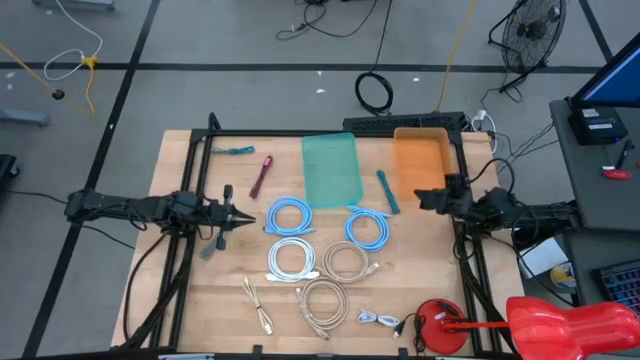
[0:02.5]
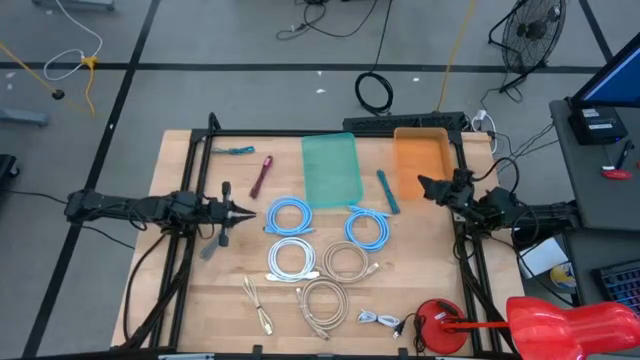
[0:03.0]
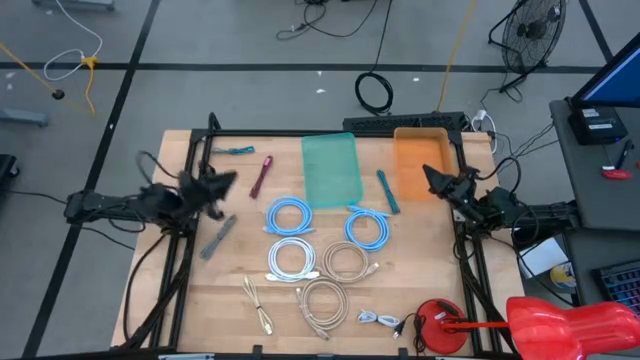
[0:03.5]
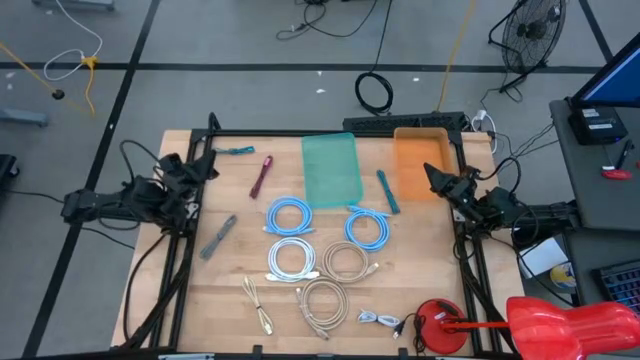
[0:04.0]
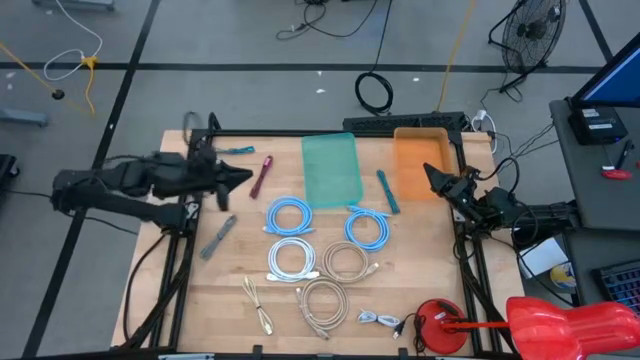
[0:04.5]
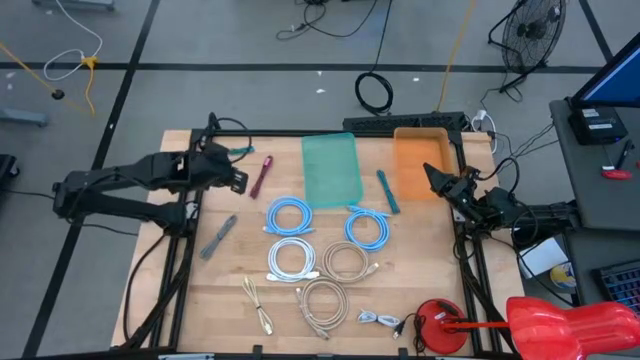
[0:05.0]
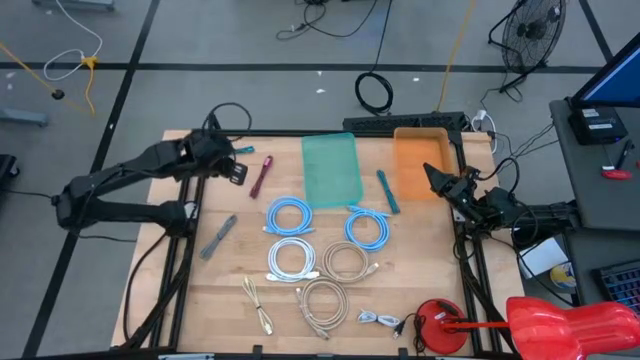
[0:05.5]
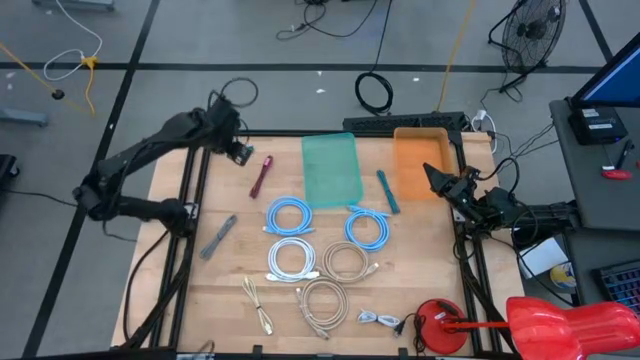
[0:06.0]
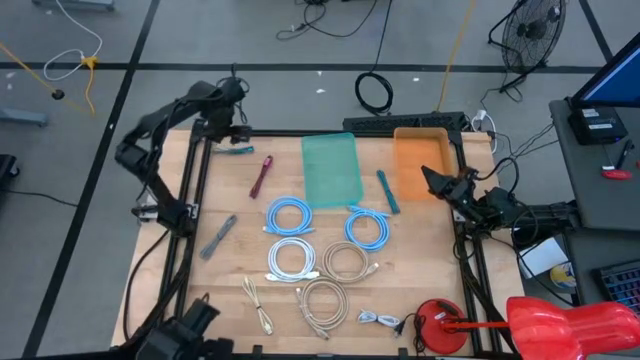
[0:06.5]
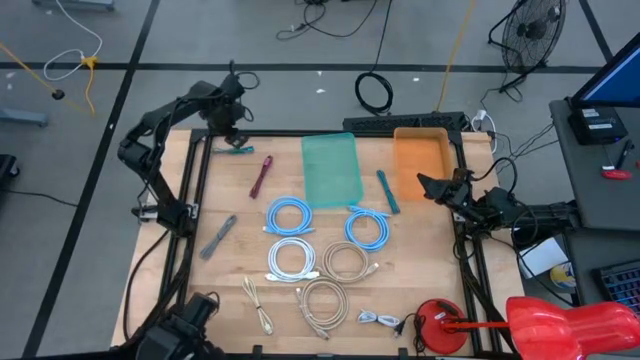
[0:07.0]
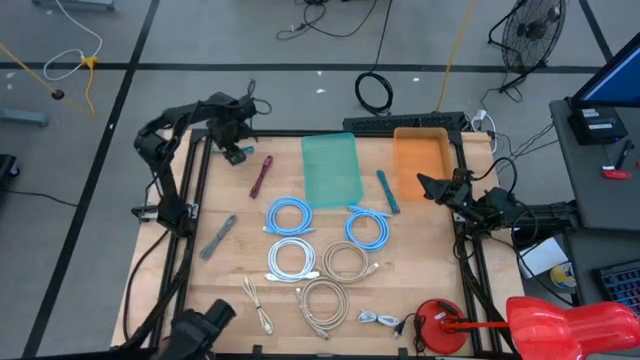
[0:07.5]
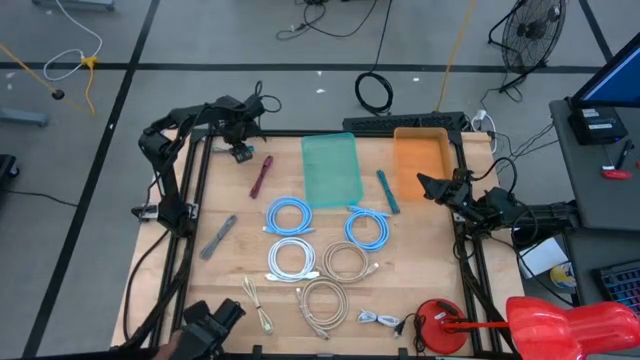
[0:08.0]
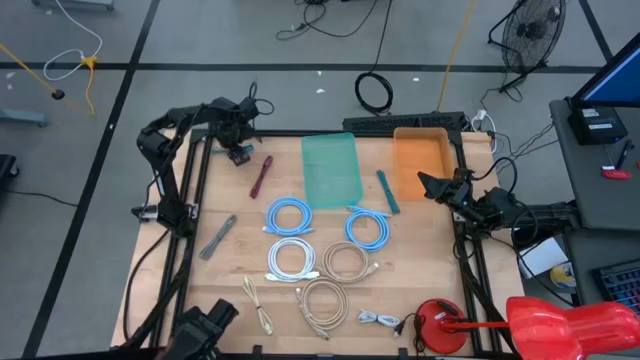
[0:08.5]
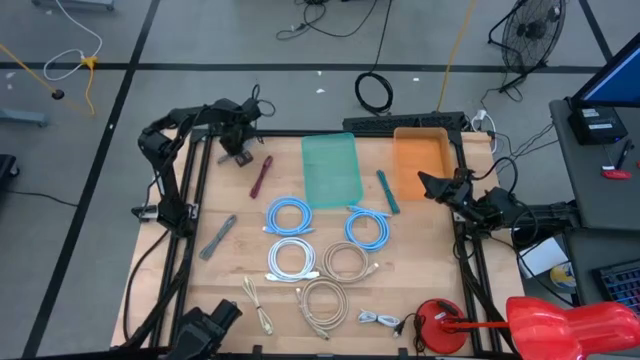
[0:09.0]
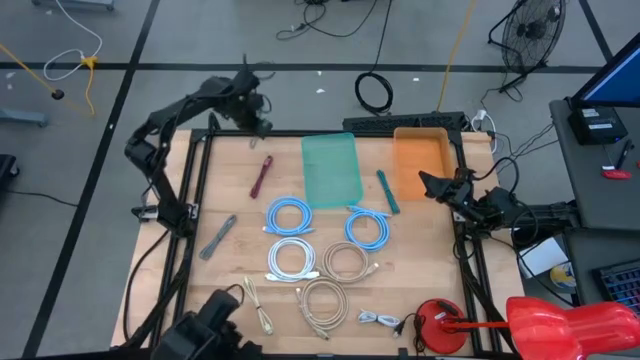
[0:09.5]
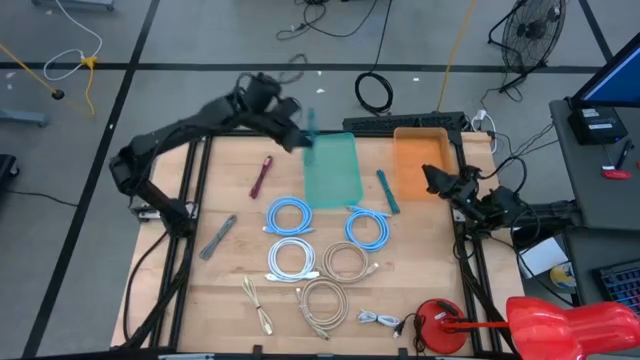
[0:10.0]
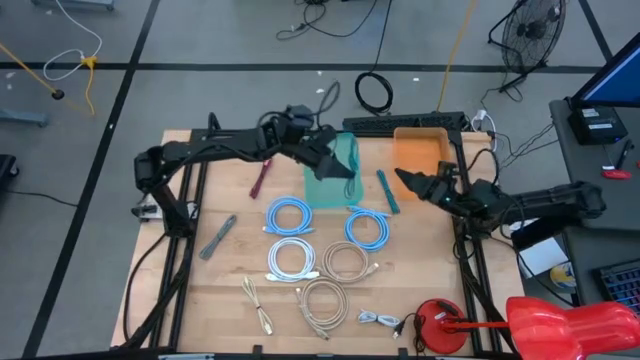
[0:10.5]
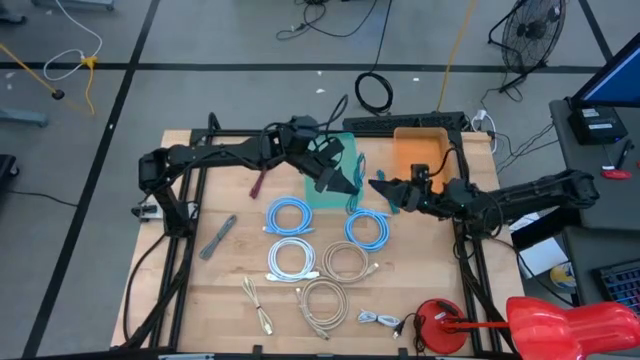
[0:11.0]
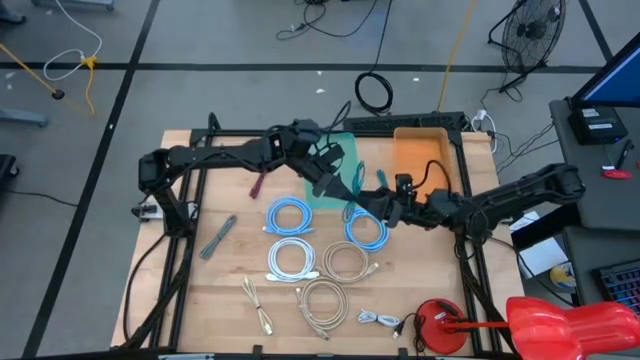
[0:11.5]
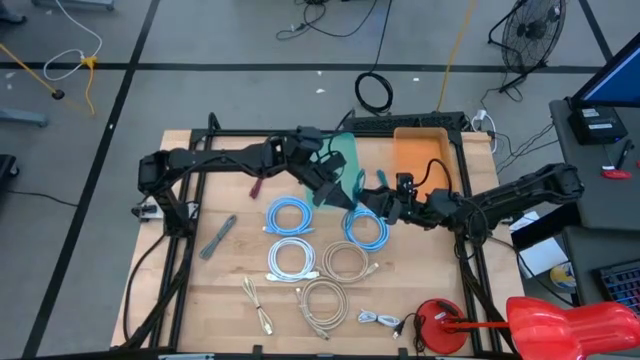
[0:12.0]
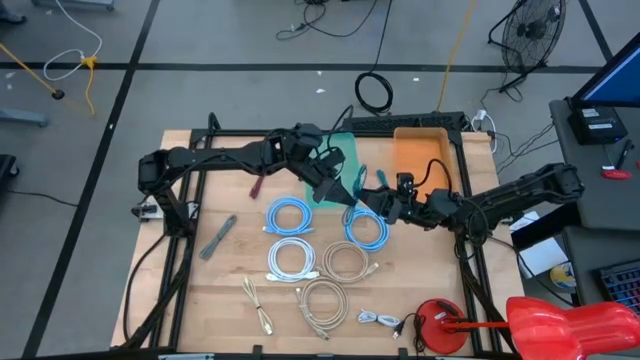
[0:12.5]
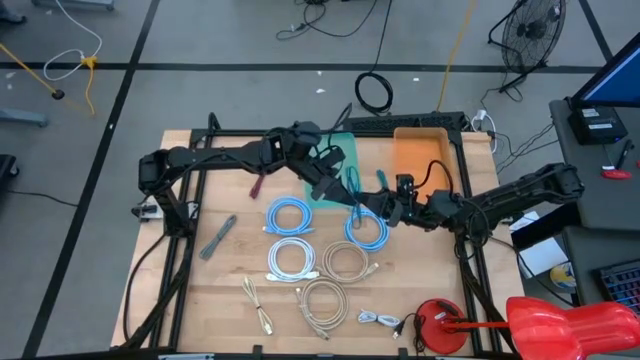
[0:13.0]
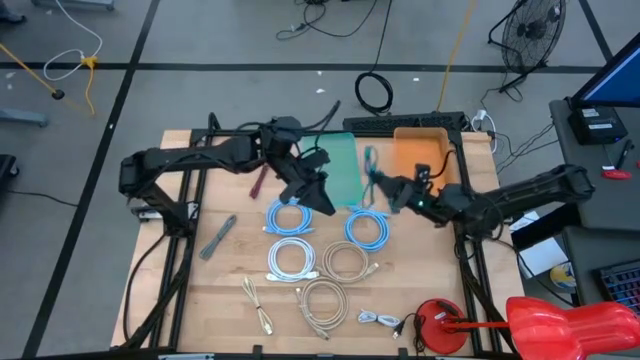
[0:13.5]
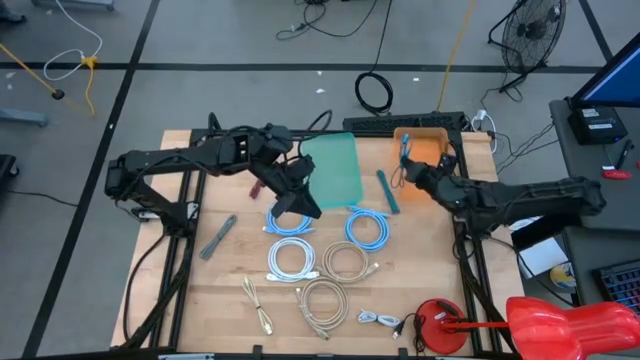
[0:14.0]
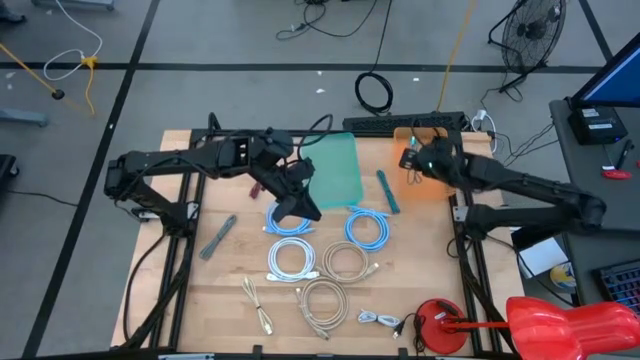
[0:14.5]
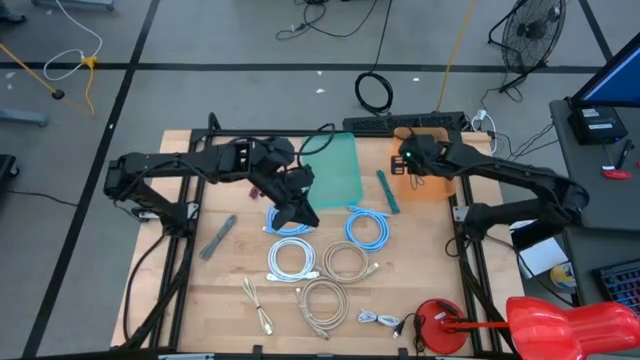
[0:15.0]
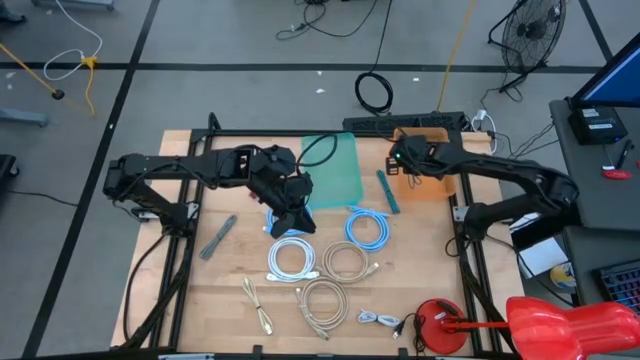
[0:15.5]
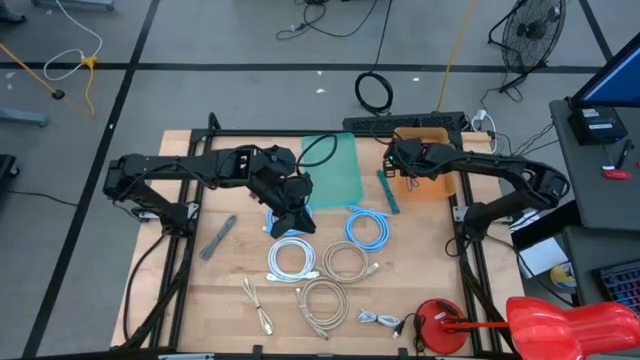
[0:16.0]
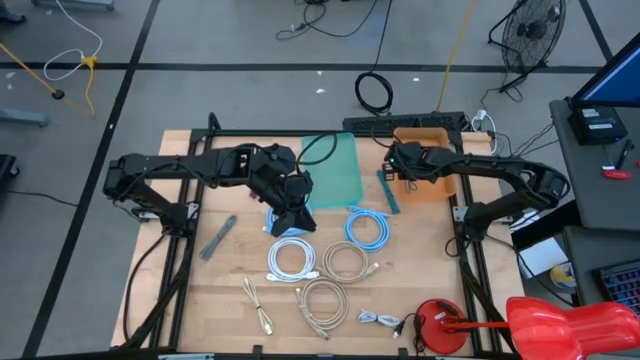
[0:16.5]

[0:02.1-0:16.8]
Task: Pick & Place USB Port
Put the top blue charger cable into the orange bin

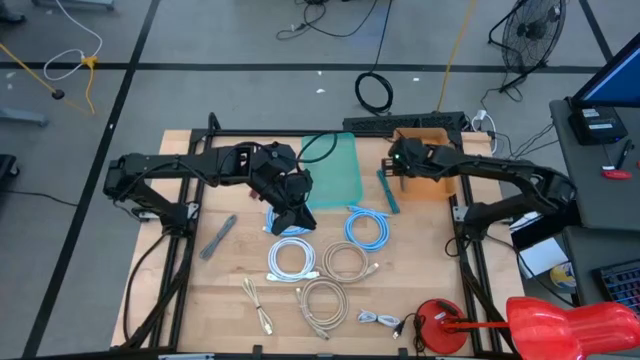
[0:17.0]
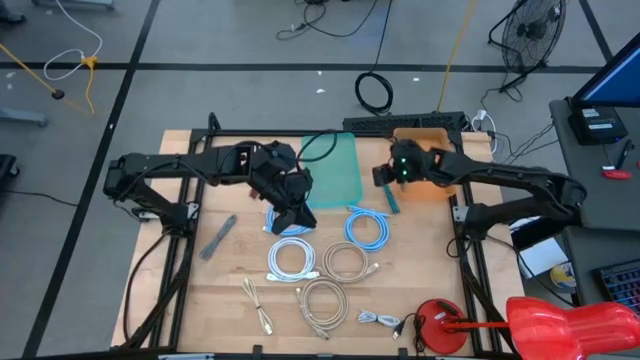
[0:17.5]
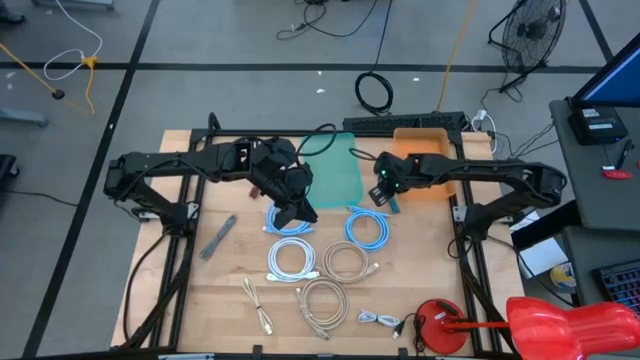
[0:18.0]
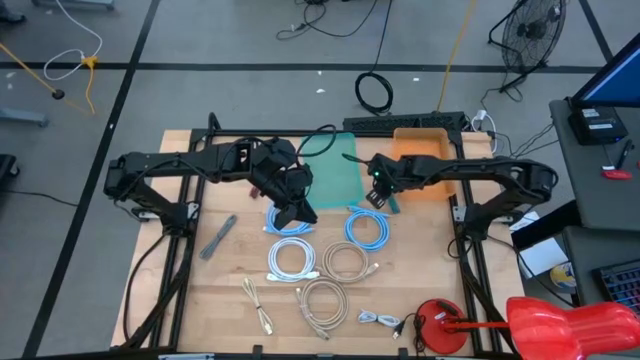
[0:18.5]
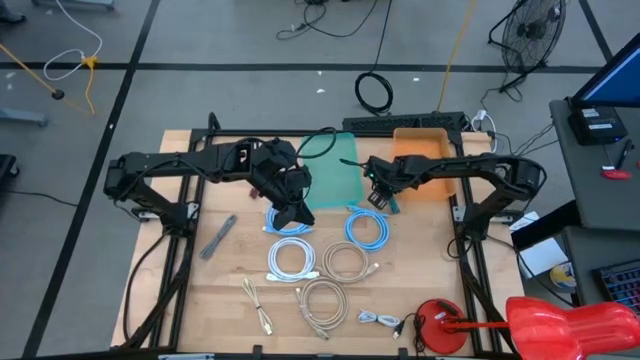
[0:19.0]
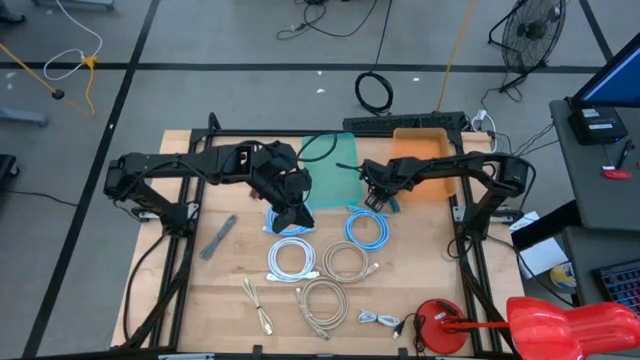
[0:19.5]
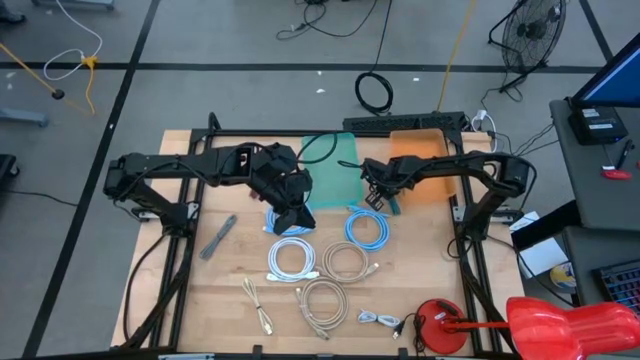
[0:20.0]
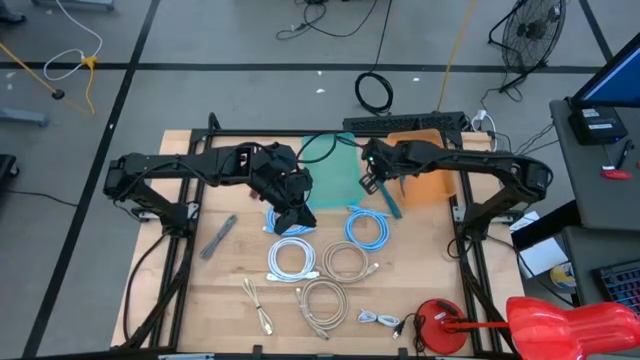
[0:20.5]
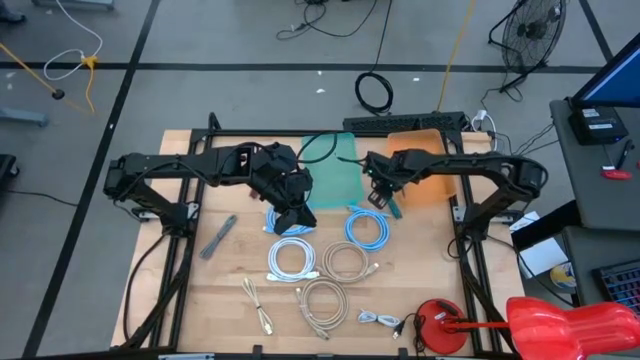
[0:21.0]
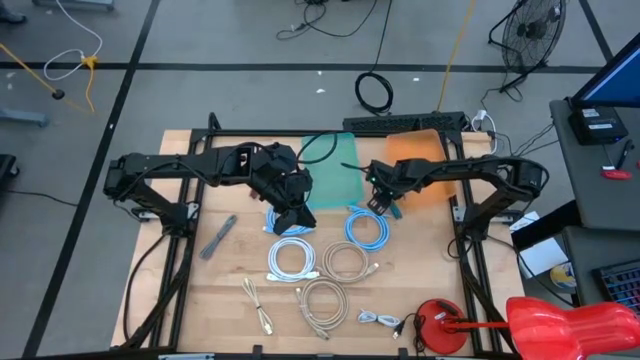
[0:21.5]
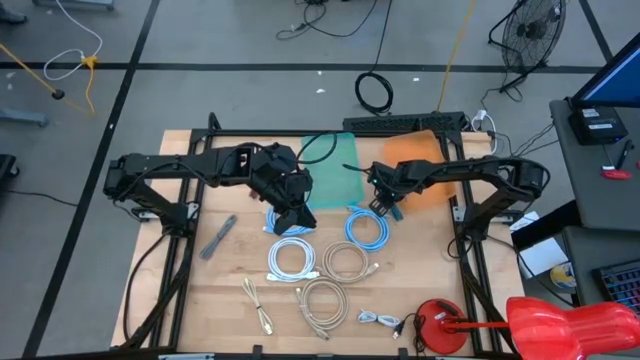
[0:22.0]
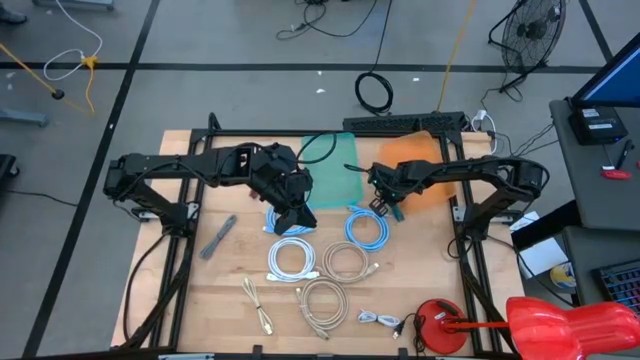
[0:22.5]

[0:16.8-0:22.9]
Put the blue changer cable into the orange bin
